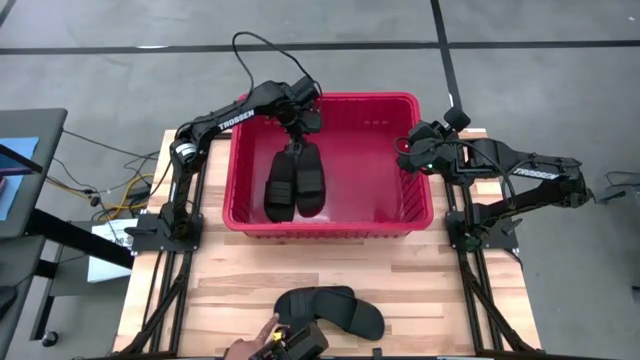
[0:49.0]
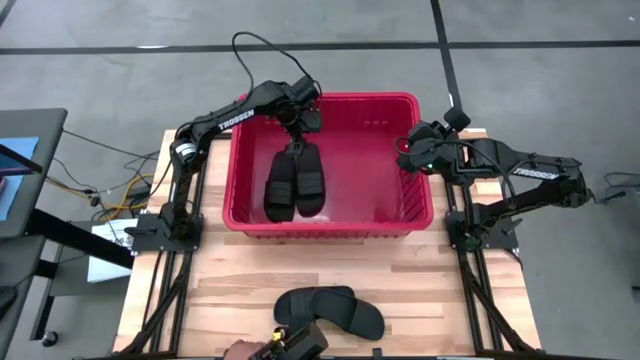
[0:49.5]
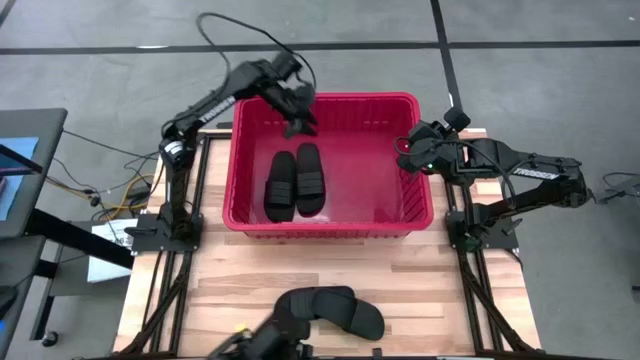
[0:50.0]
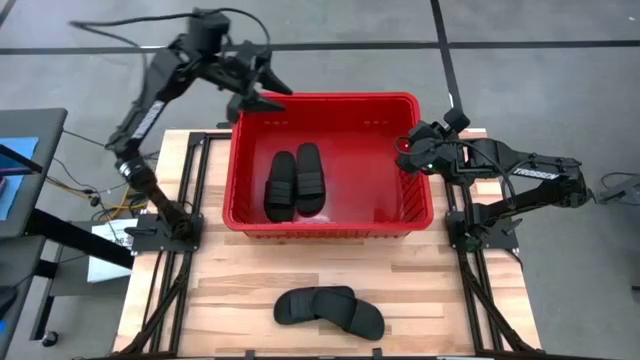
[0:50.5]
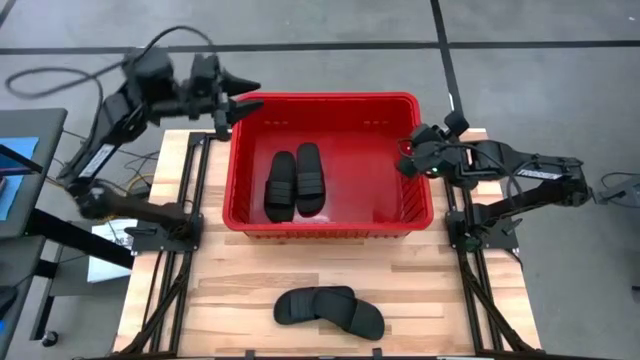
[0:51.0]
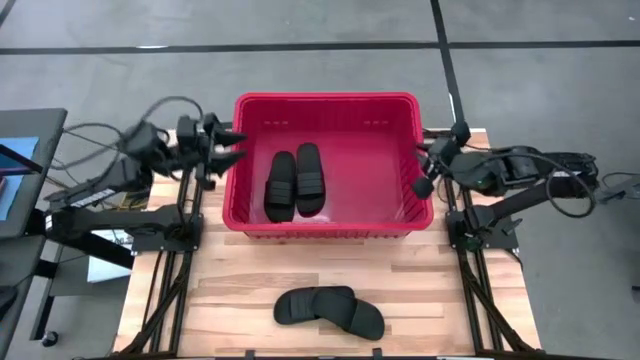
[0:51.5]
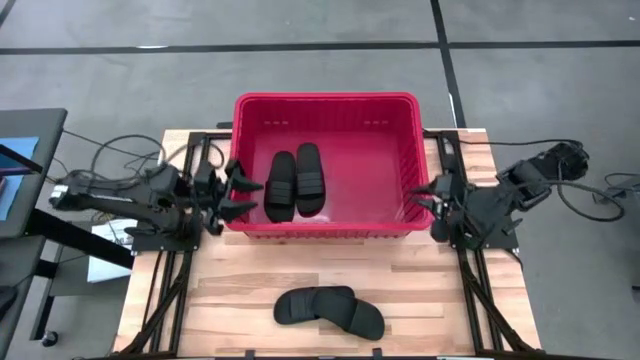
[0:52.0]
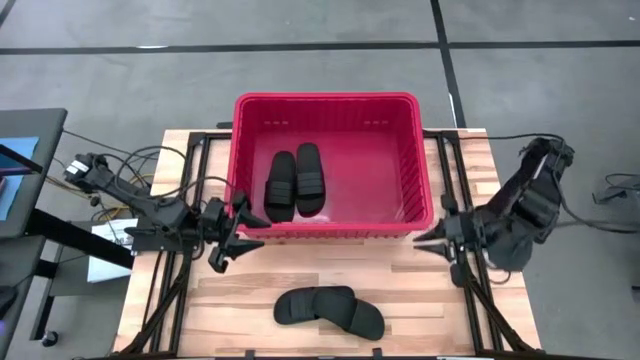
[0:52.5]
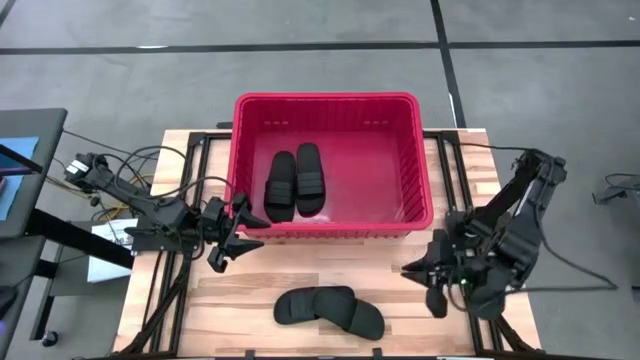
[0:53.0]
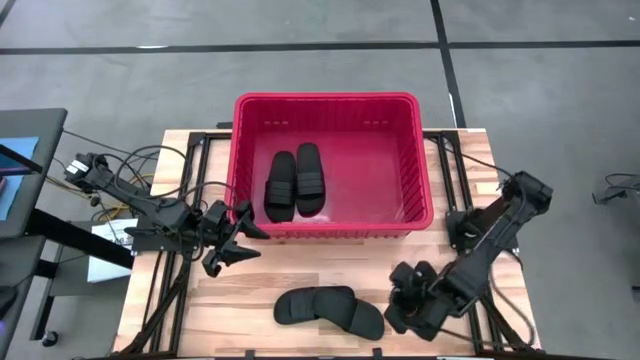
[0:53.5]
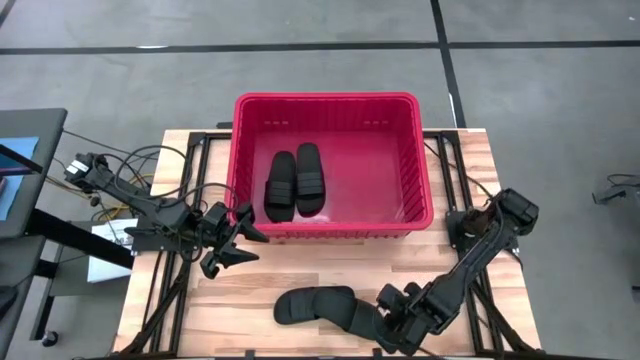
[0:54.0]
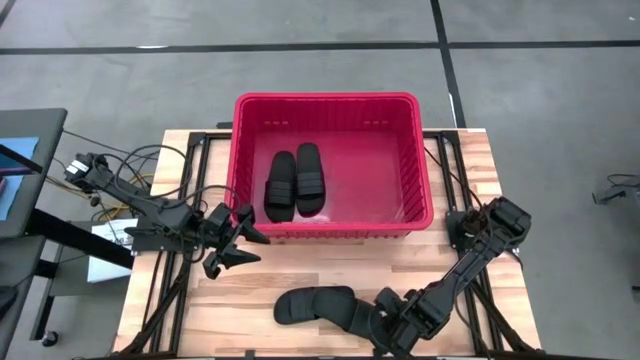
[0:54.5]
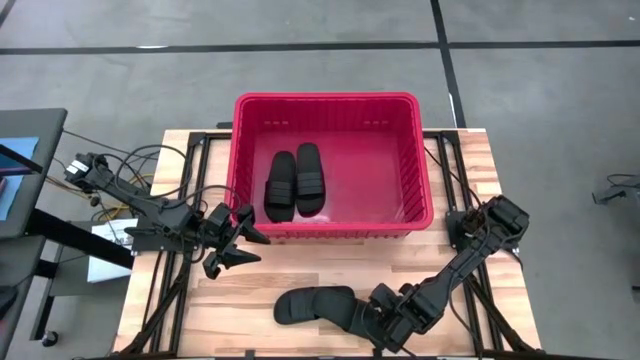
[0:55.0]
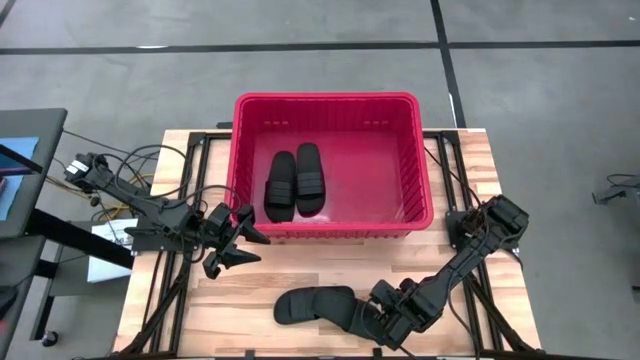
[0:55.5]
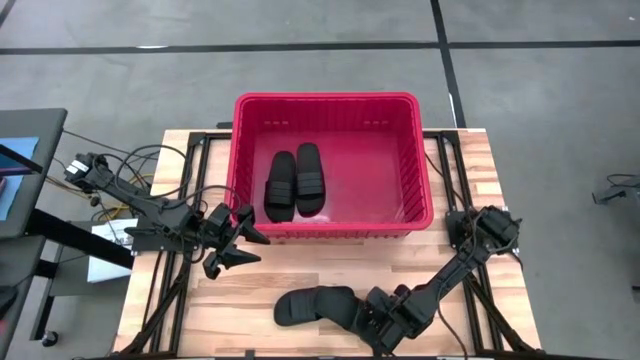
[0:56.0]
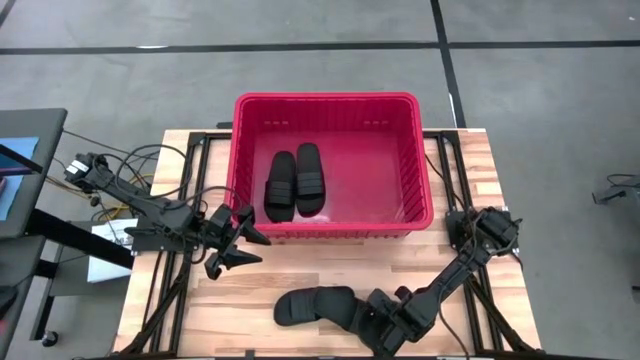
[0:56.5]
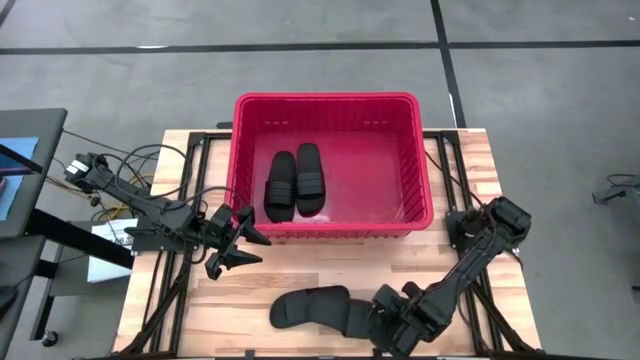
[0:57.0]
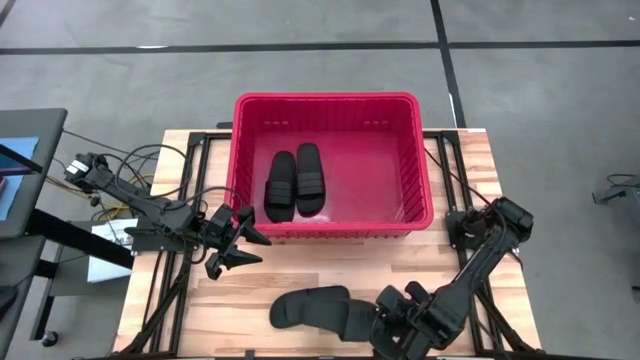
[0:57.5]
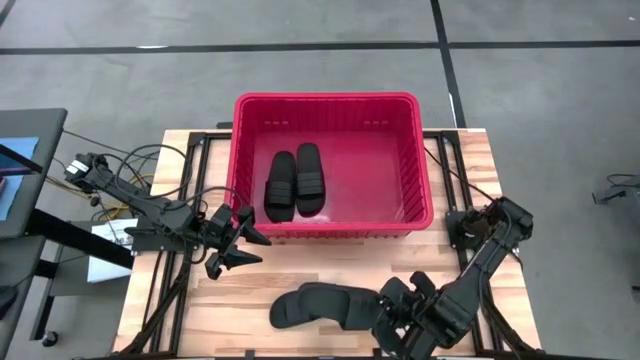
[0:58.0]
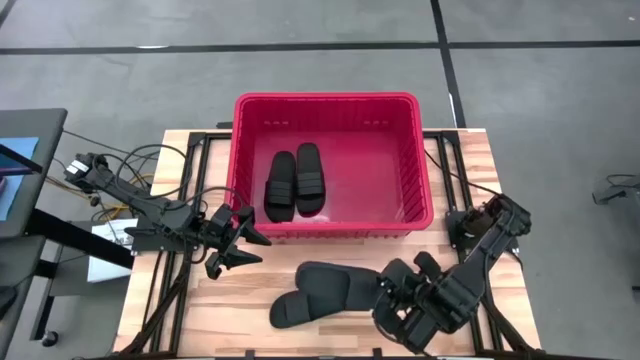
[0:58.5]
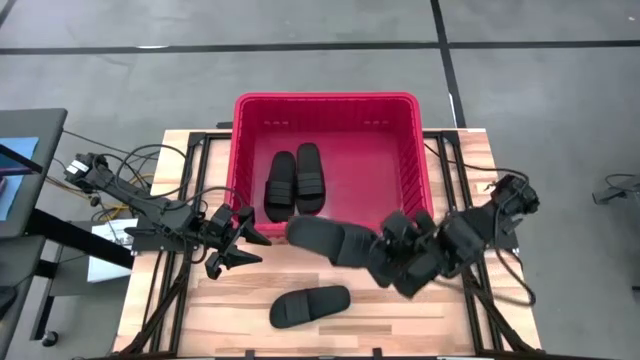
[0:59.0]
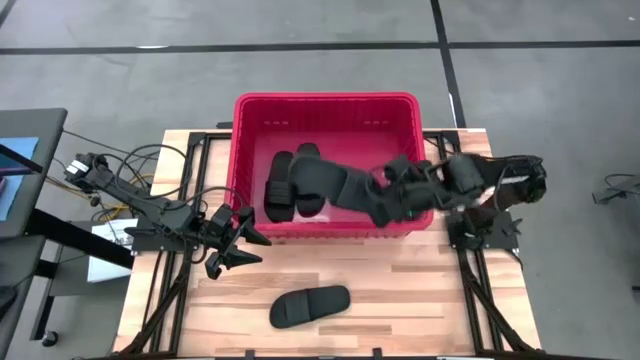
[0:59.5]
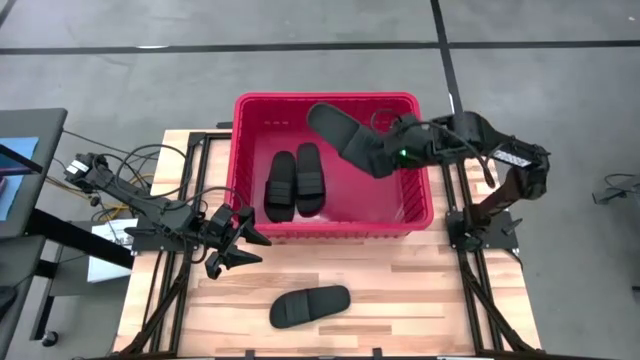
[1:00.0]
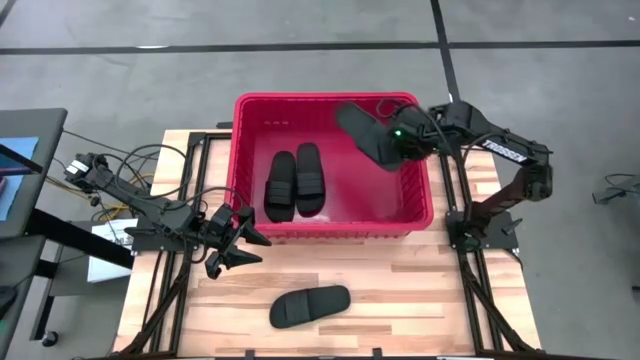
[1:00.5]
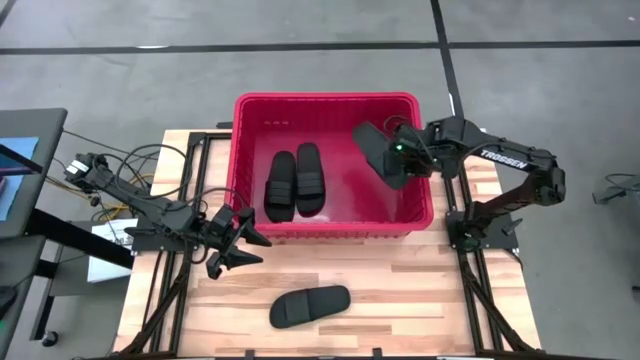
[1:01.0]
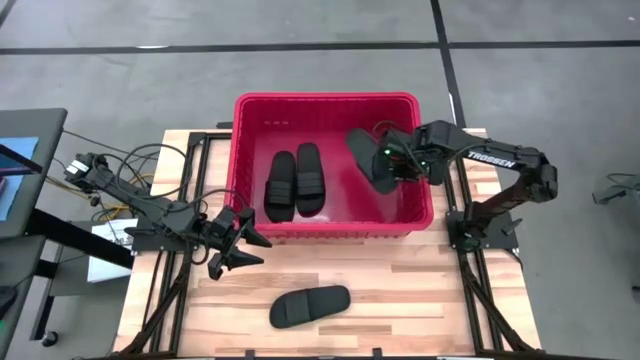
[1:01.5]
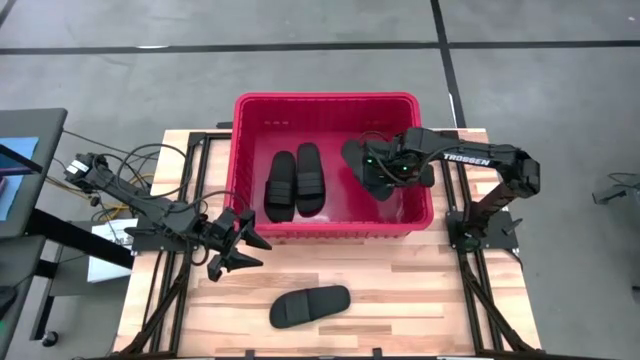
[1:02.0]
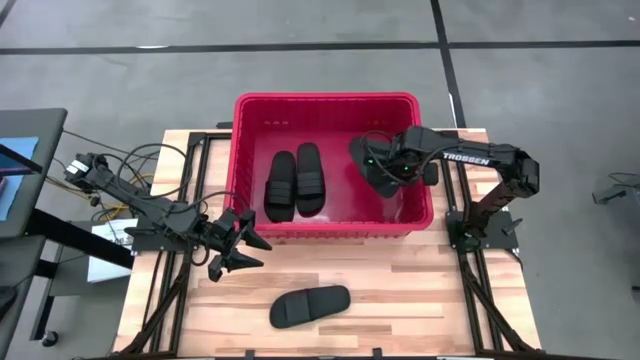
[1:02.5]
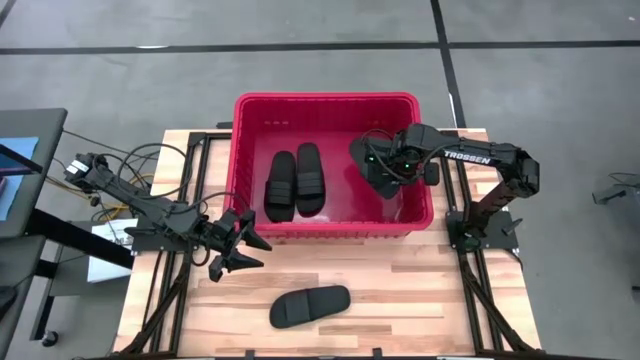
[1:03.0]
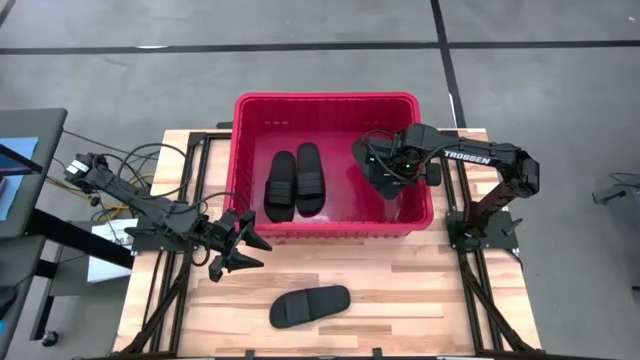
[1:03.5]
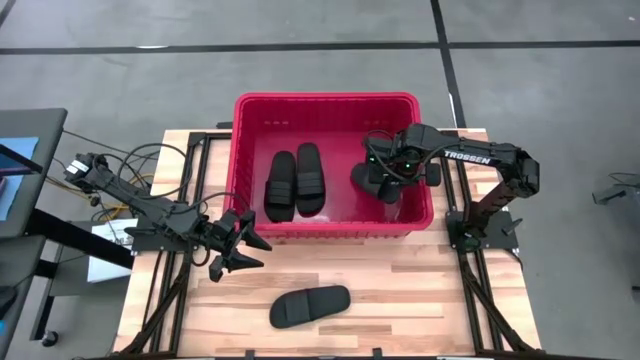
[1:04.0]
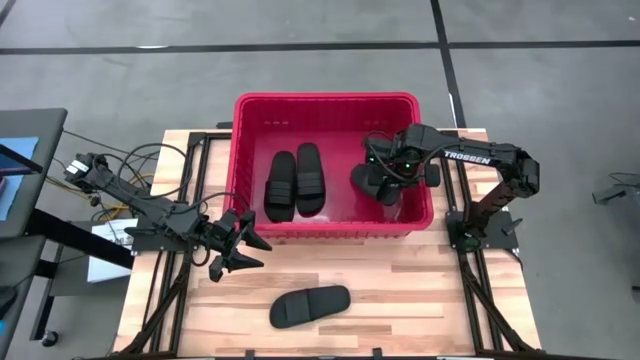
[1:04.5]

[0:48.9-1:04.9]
Task: Pick and place slides into bin
Put the right slide into the organizer bin

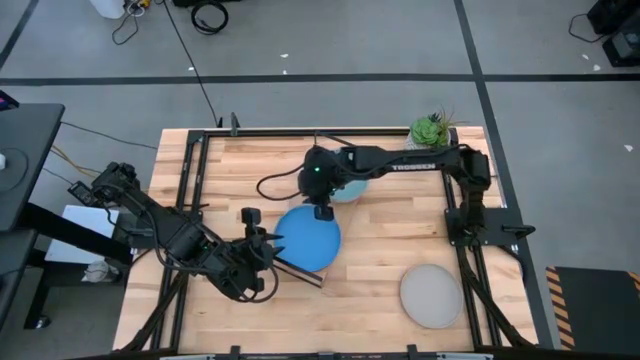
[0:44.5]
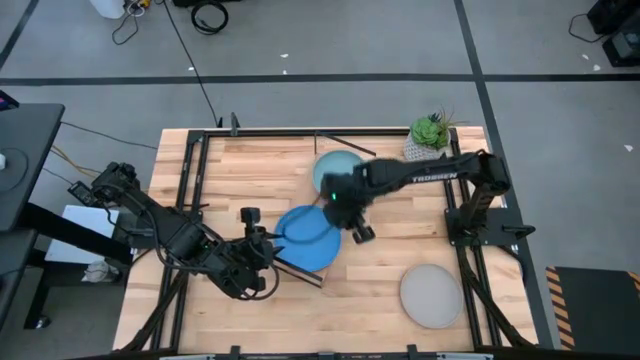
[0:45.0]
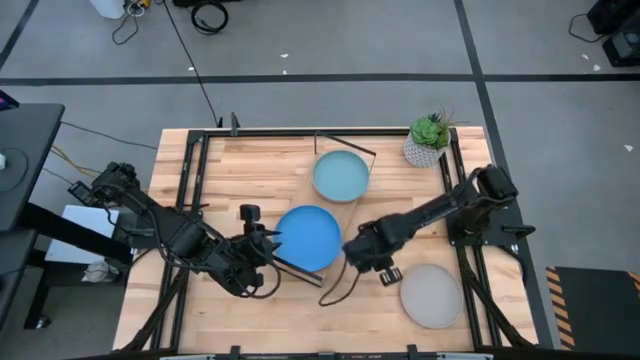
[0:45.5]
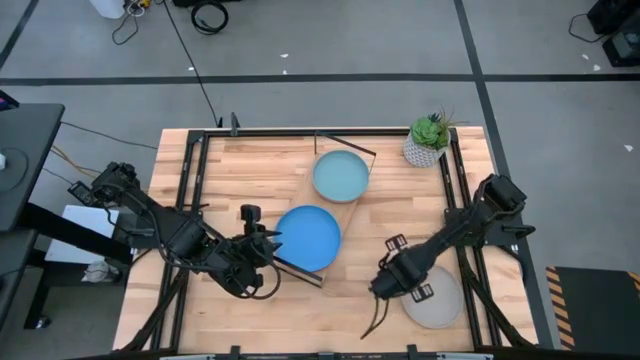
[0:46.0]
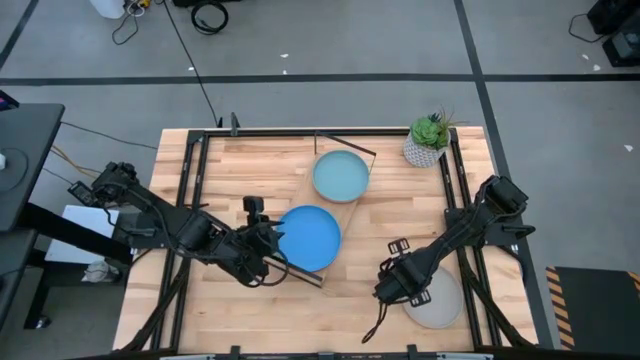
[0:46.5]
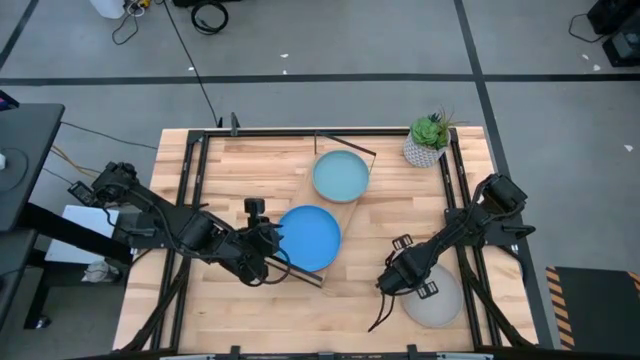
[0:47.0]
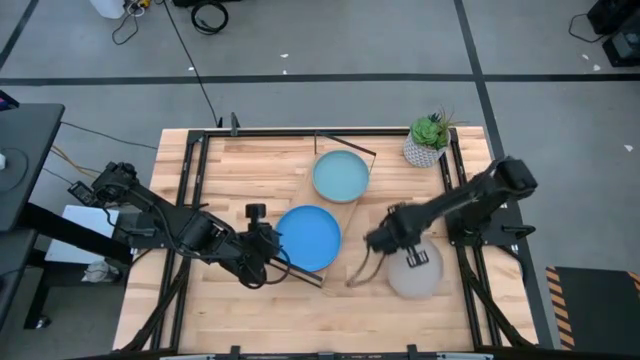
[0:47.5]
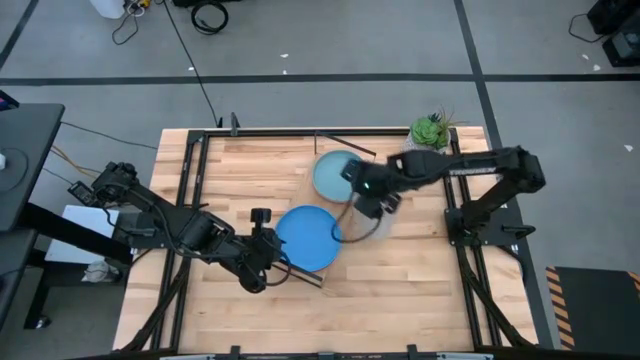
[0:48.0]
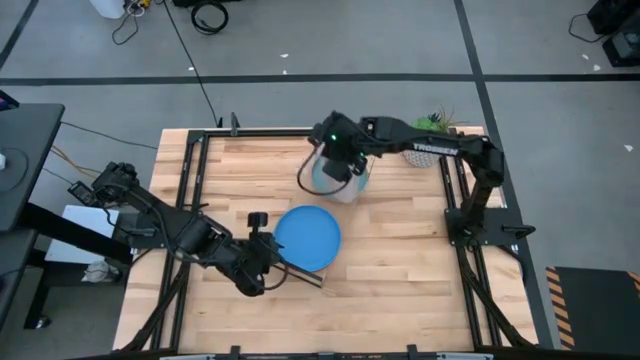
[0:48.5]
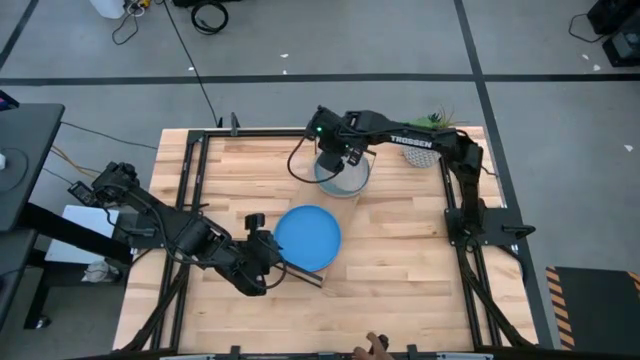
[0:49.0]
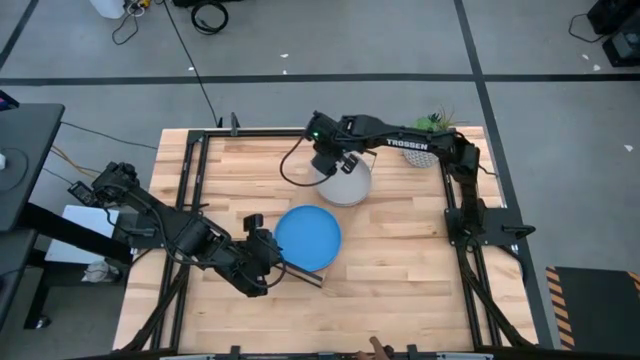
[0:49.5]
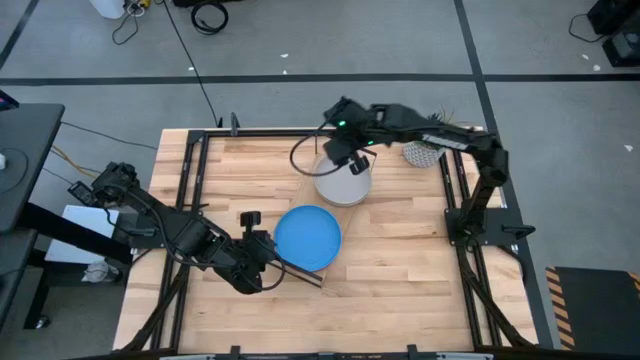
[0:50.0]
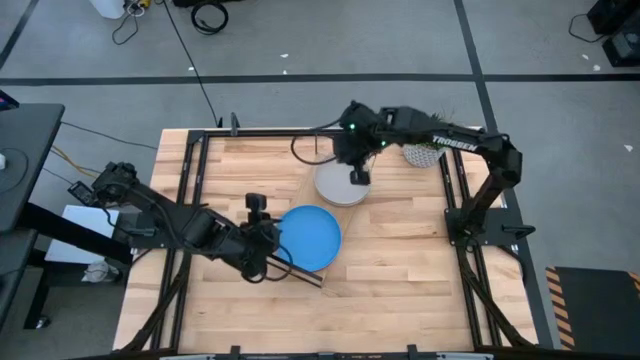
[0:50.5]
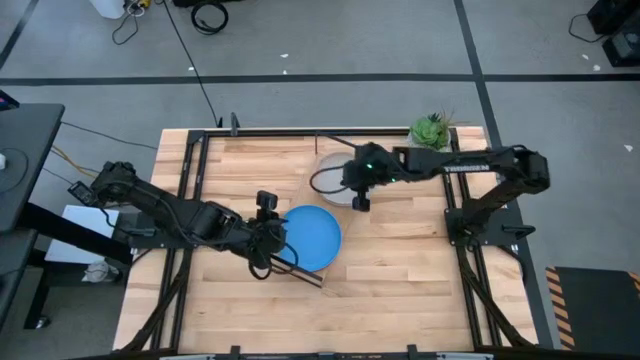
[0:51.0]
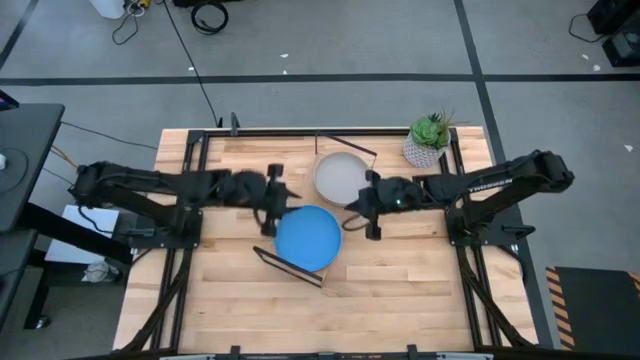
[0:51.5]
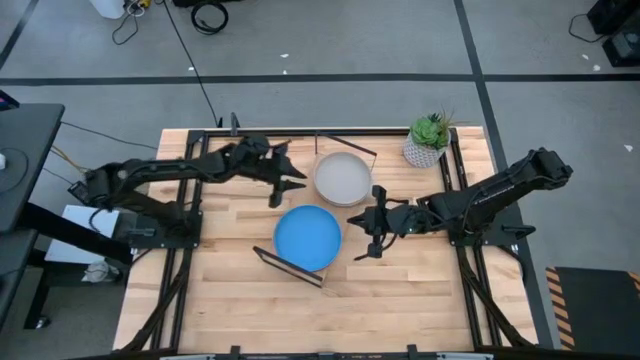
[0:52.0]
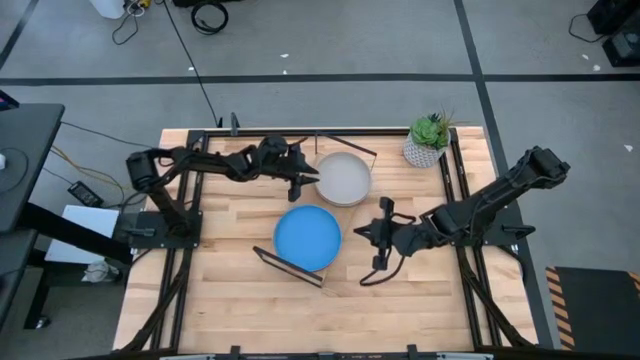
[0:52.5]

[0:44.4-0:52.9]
Task: Place and stack plates onto a shelf
Stack the gray plate on top of the light blue plate on the shelf
